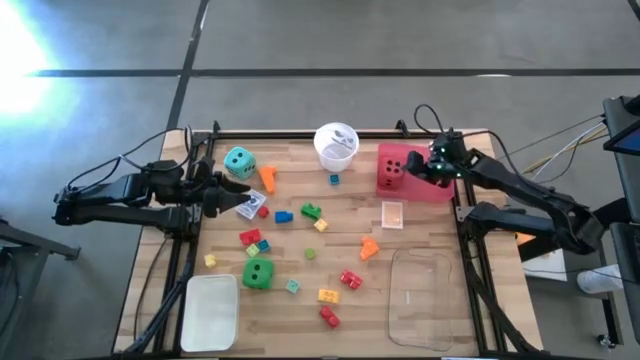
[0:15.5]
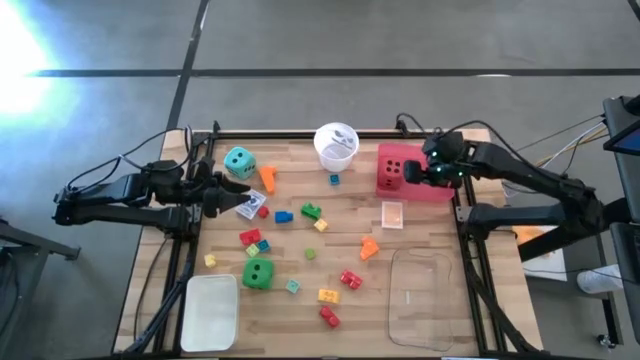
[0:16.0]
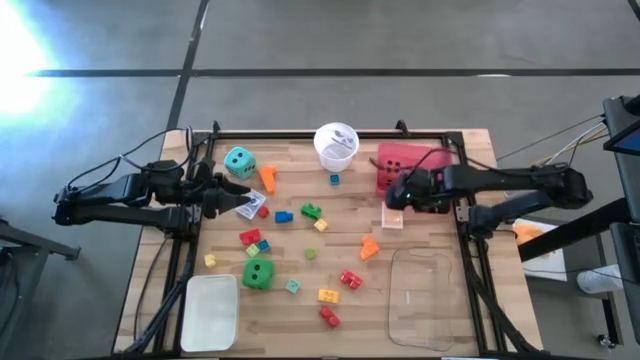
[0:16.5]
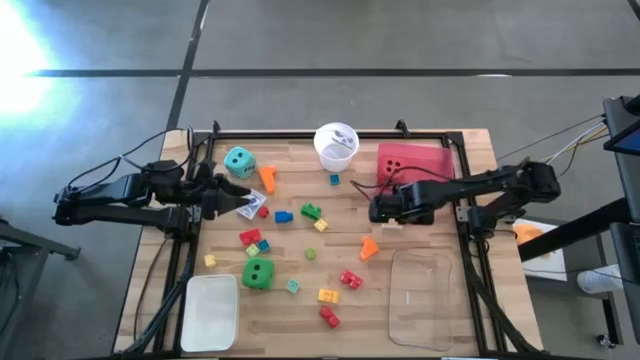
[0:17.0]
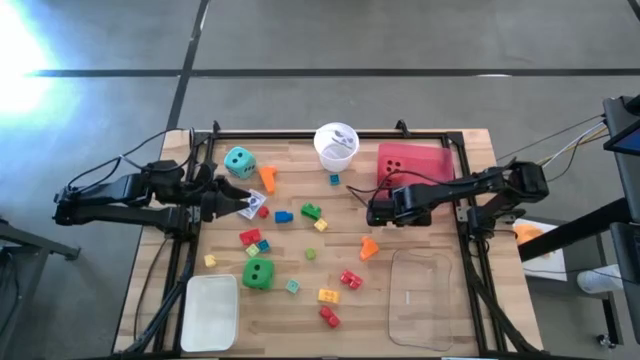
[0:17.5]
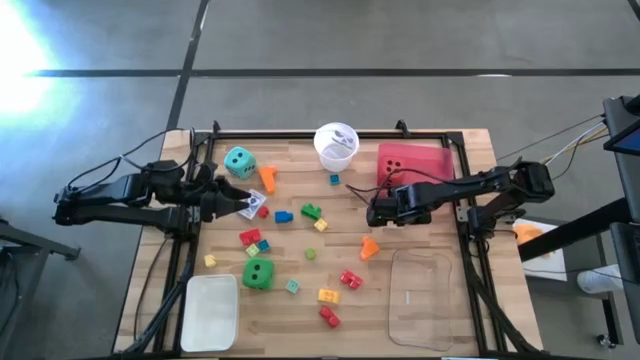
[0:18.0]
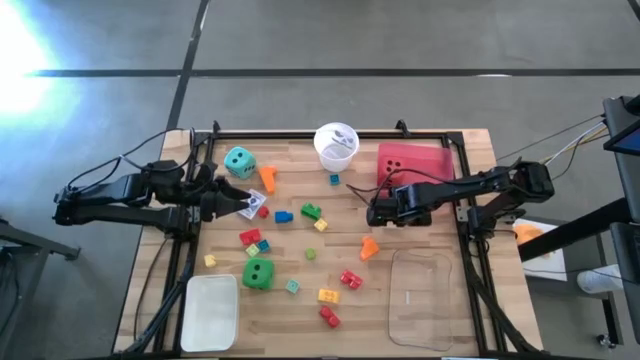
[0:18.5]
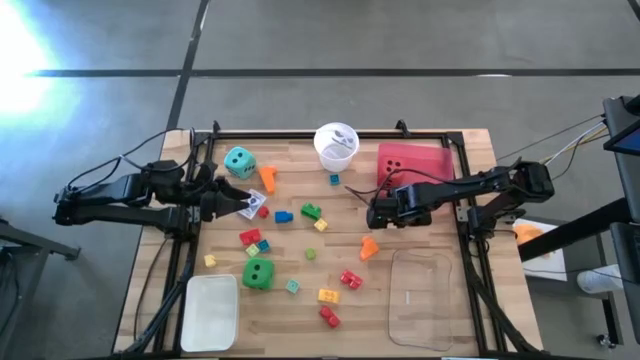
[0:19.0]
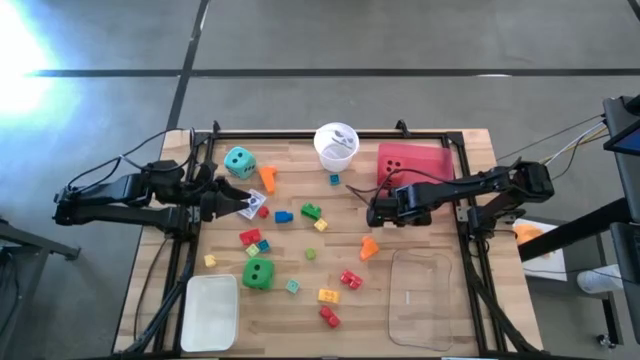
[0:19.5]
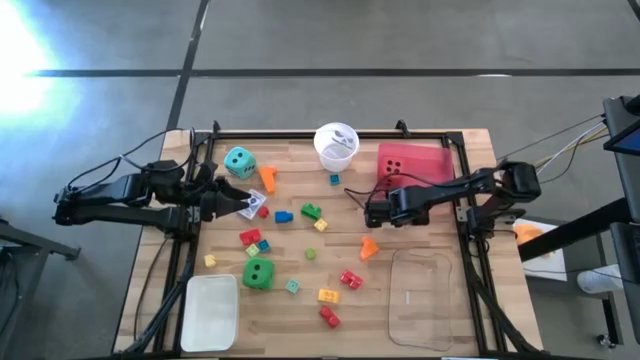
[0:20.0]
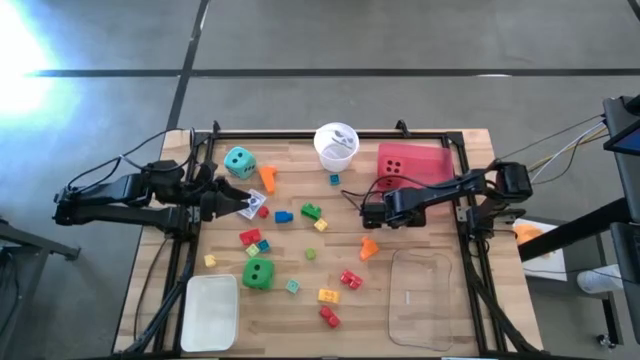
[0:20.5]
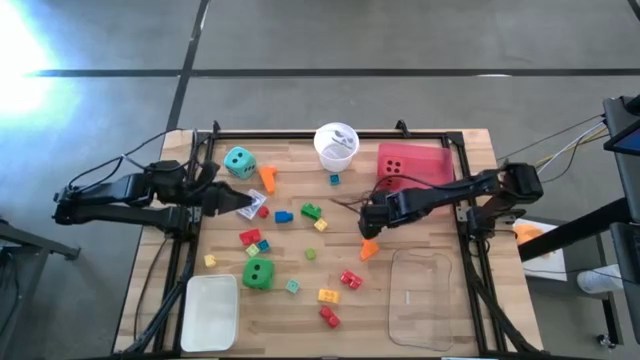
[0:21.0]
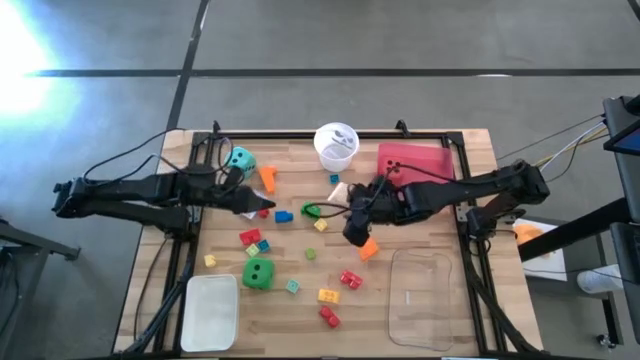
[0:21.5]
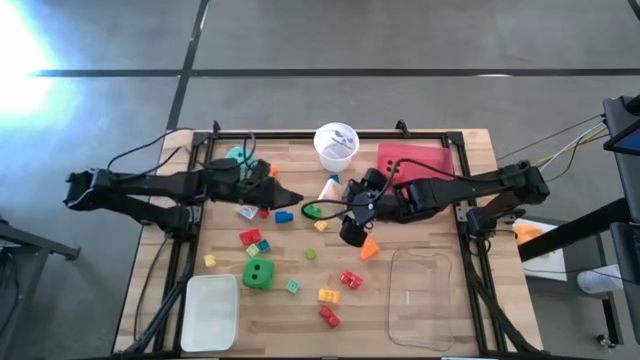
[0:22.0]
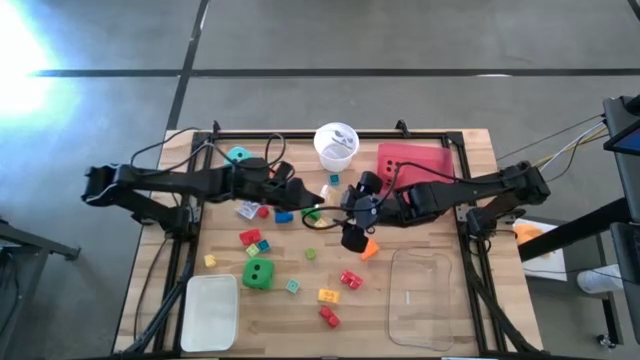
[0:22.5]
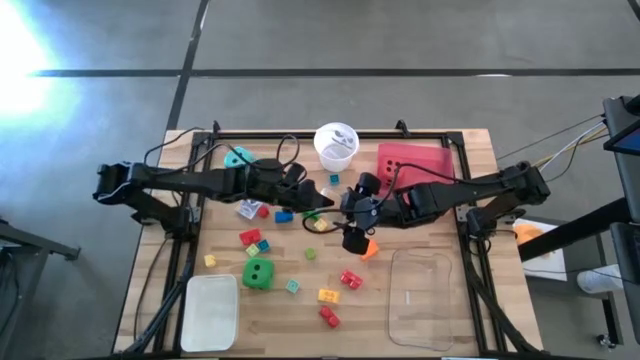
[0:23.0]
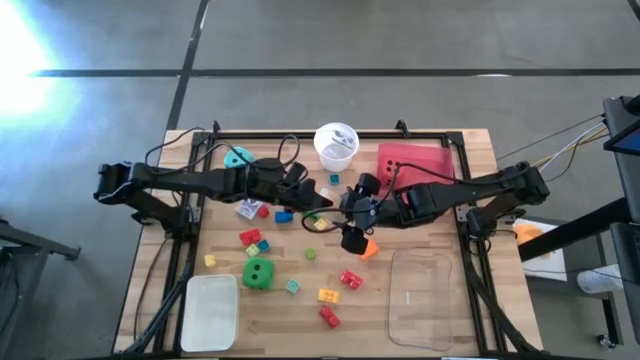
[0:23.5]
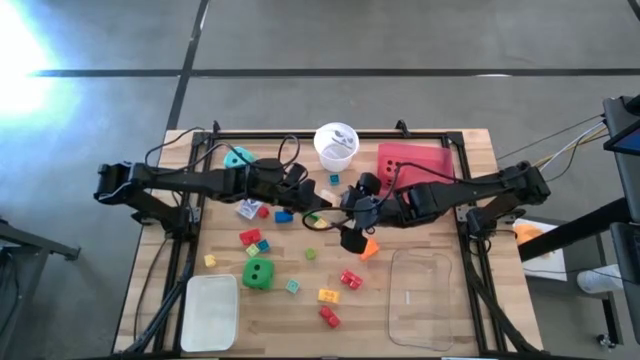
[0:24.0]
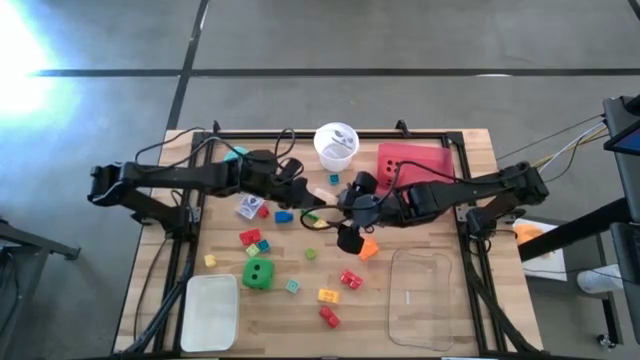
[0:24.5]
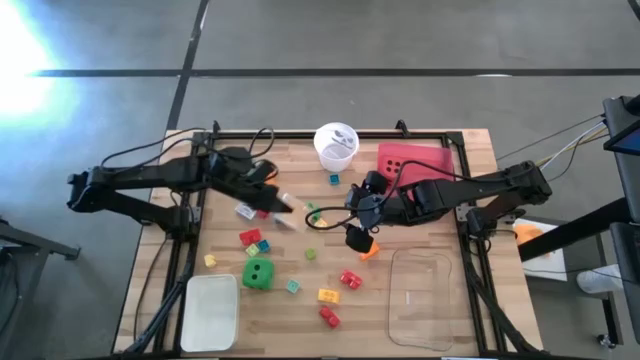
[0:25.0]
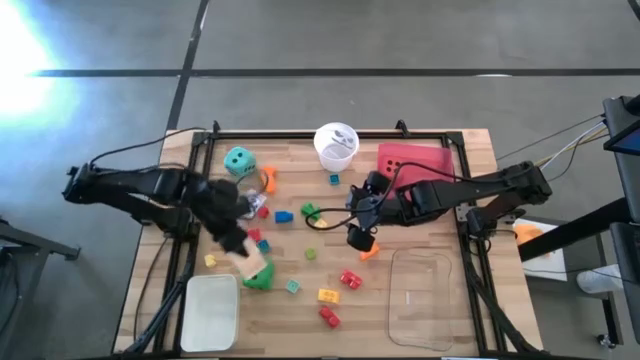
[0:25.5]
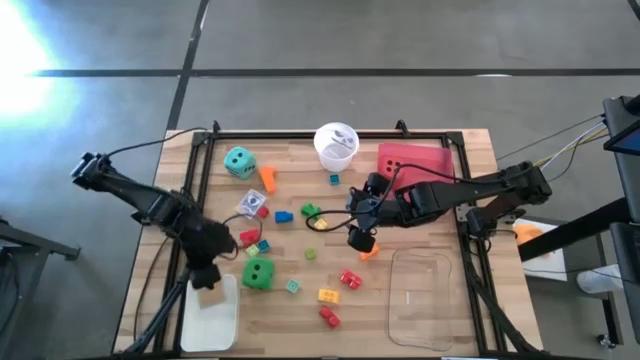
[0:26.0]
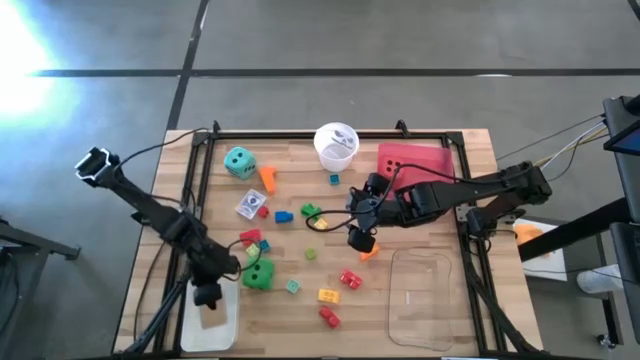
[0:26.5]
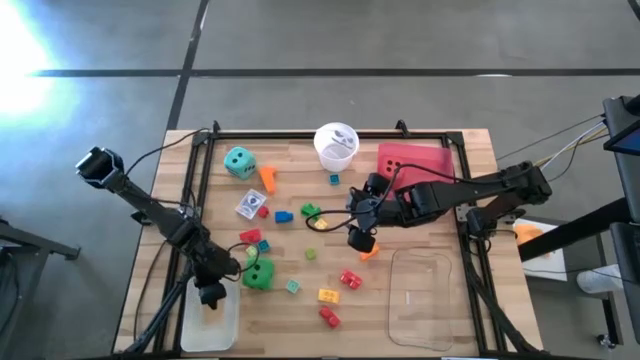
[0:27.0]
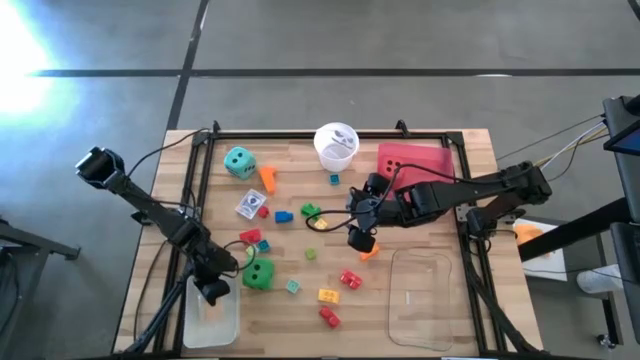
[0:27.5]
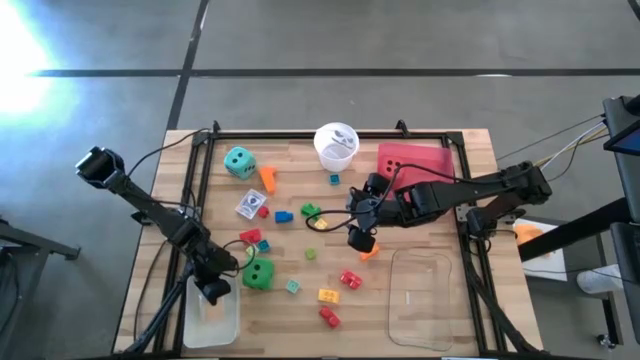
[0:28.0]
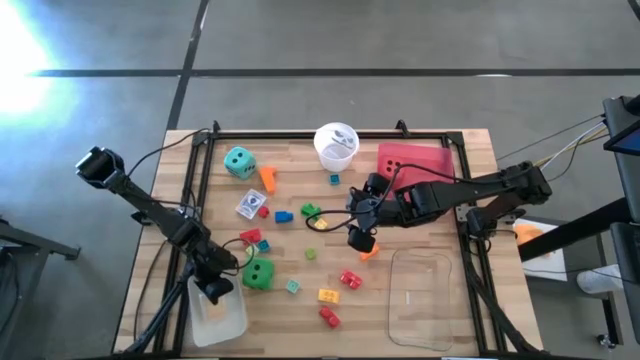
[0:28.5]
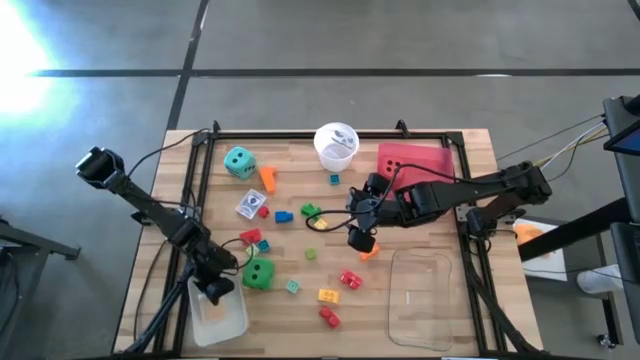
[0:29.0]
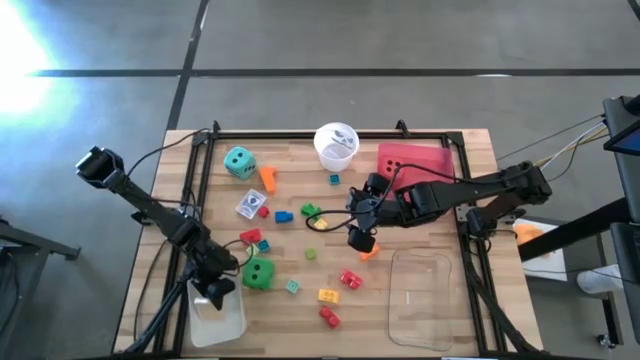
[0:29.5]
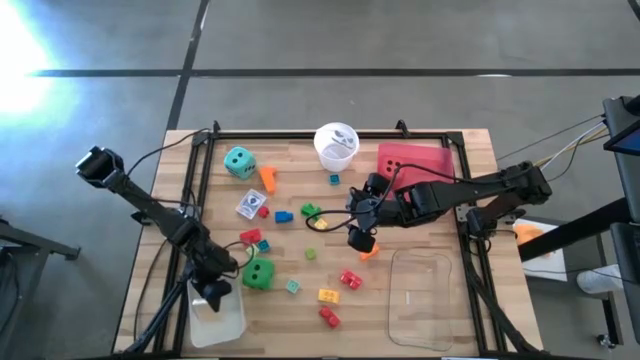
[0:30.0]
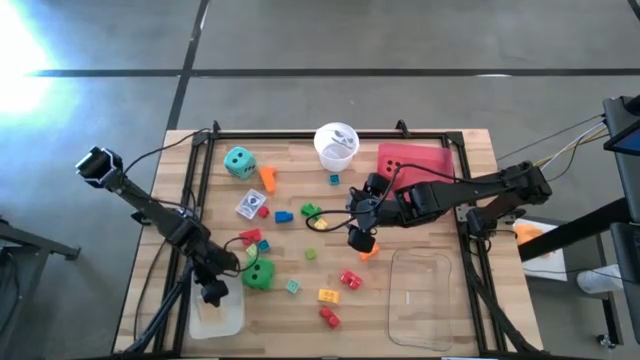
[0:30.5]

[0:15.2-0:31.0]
Task: Pick & Place Toys
Put the orange deck of cards into the white bin

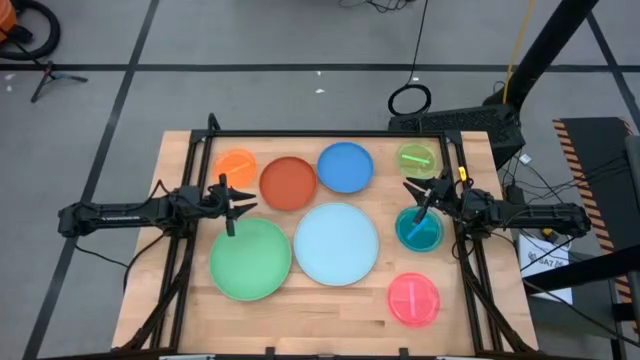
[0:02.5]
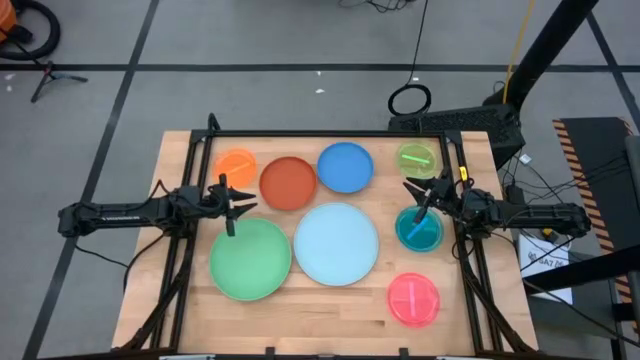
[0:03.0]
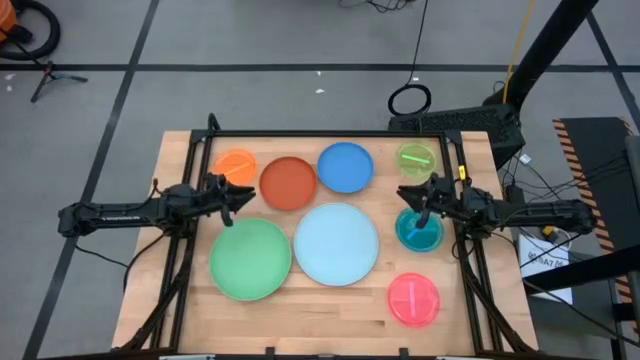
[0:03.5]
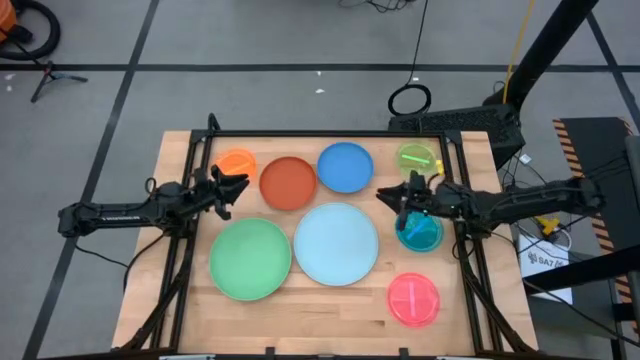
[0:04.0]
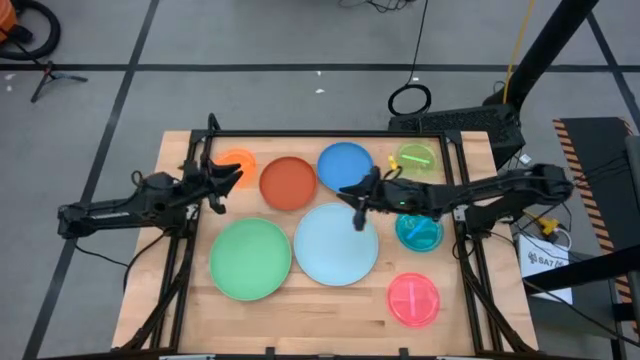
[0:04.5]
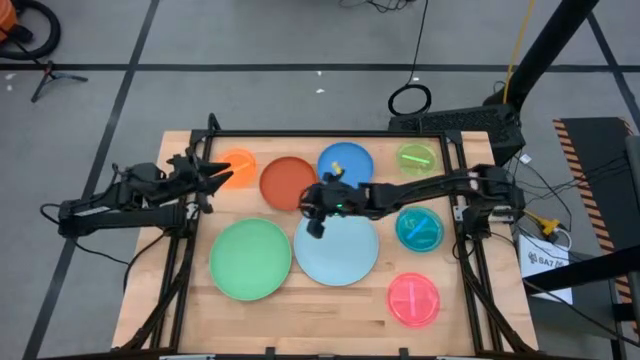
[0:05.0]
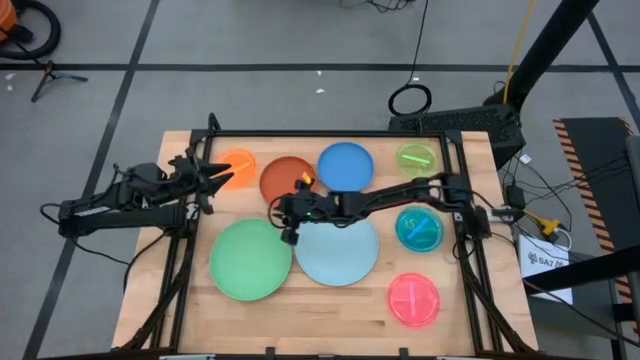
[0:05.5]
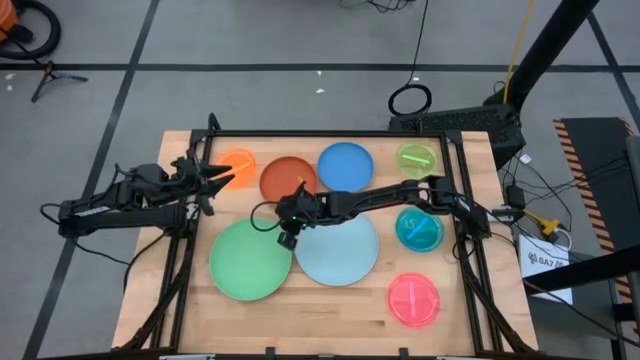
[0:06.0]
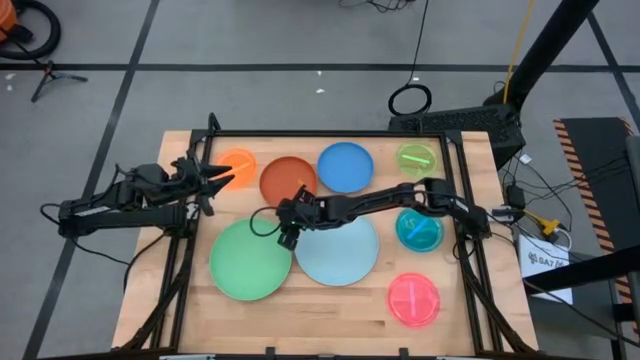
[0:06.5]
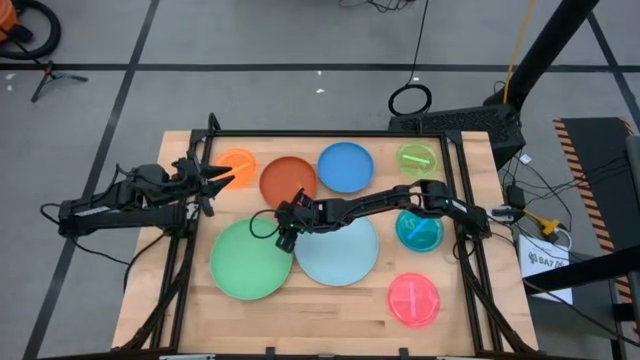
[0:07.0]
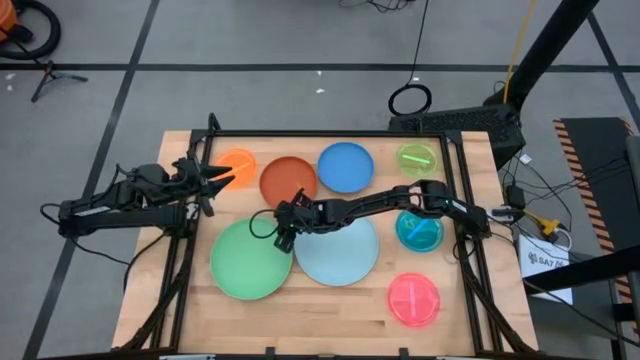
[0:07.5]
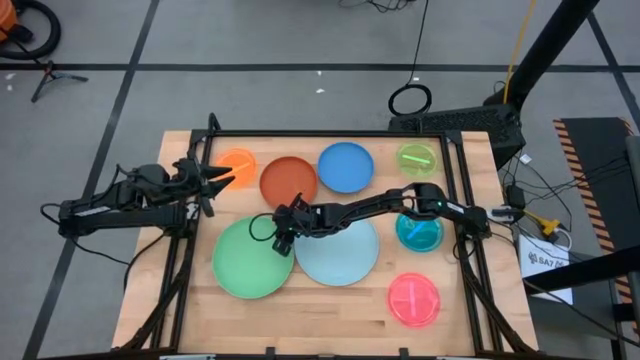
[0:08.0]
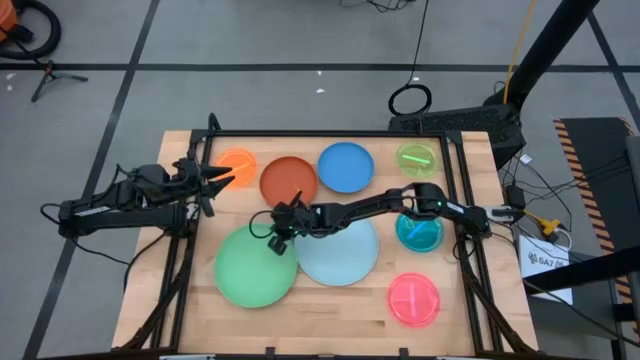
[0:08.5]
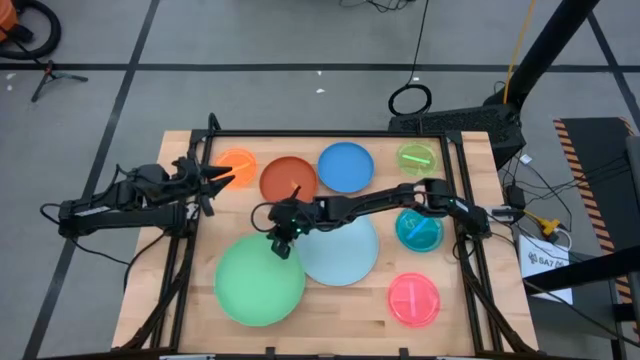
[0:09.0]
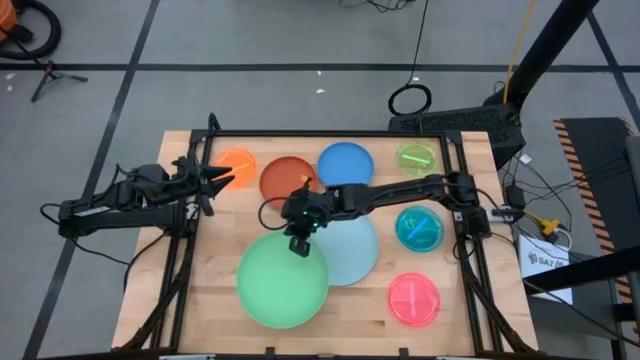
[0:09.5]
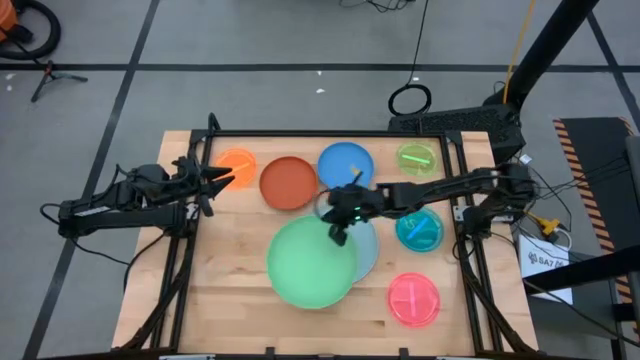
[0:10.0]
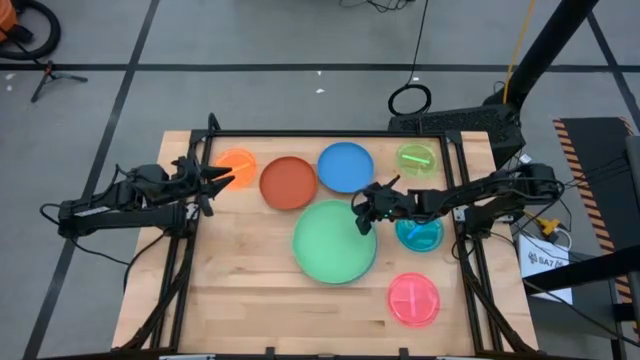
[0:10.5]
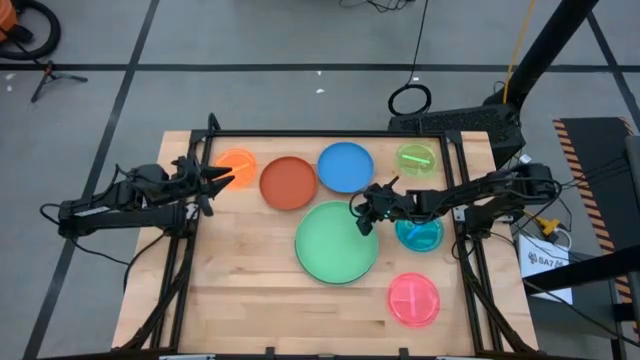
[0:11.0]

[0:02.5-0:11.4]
Task: Stack plastic plates
Stack the green plate on top of the light blue plate
